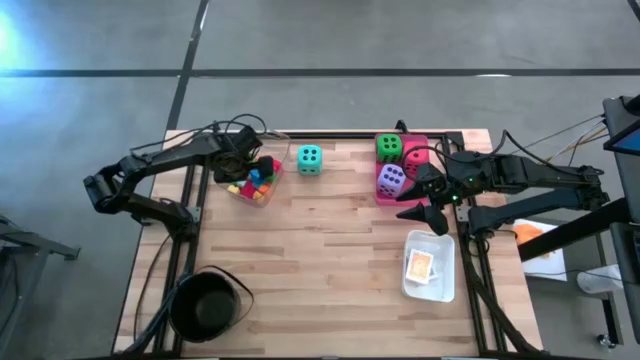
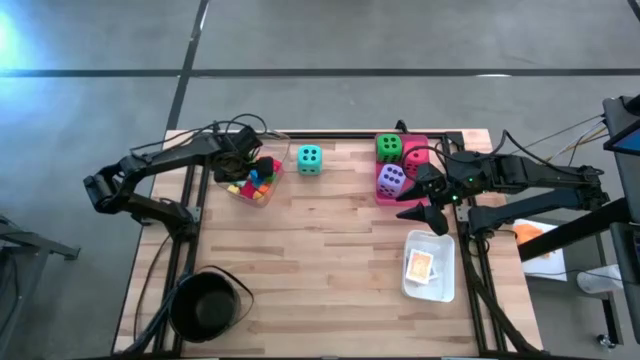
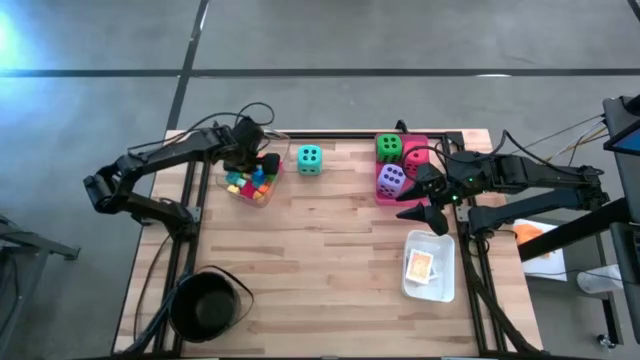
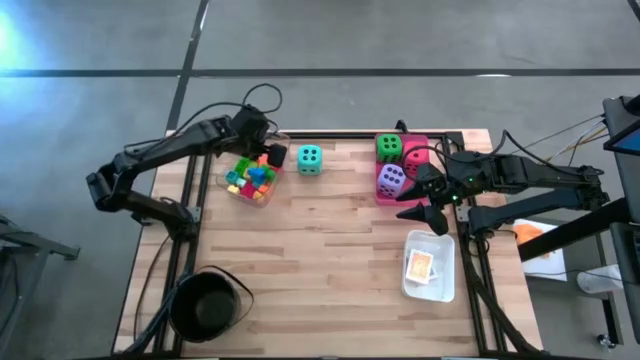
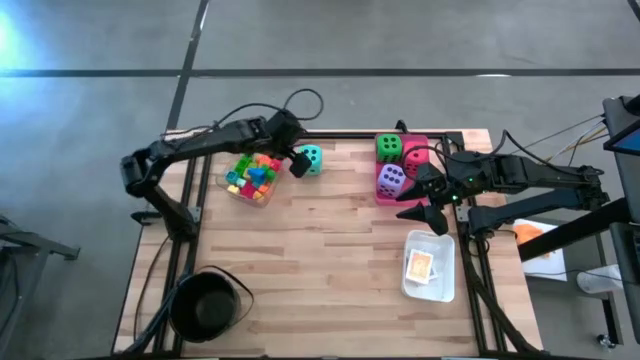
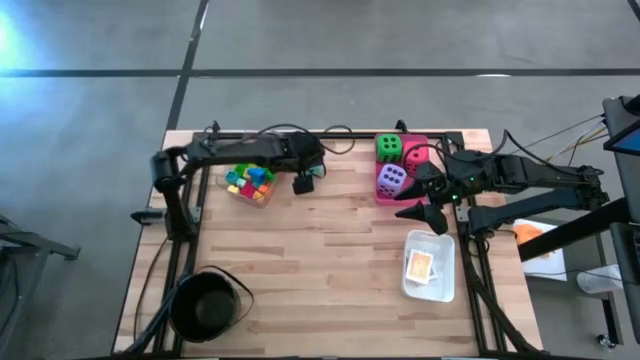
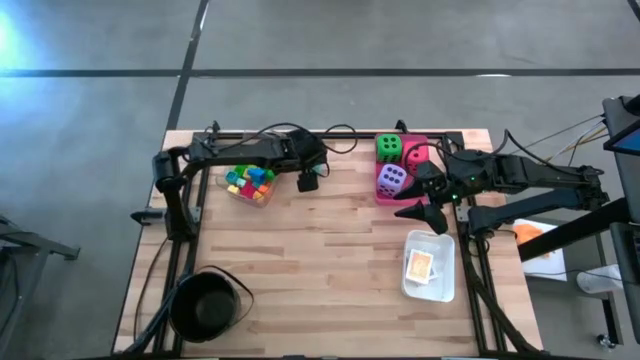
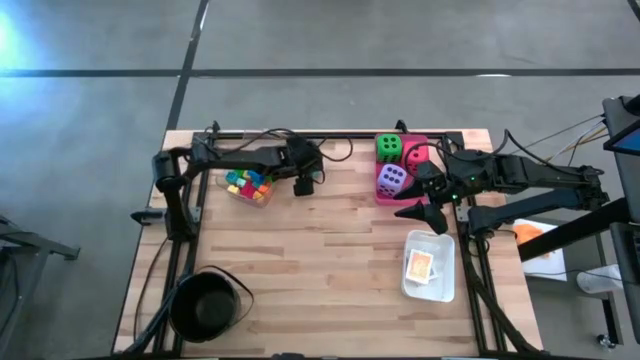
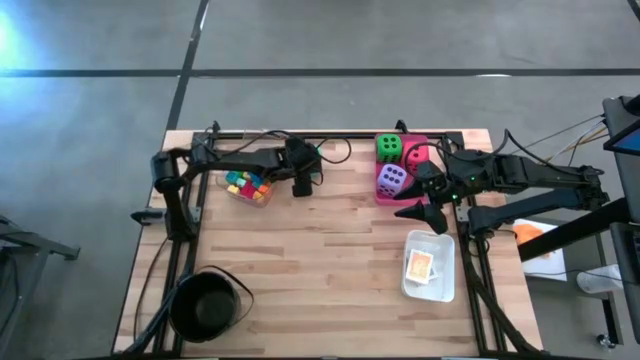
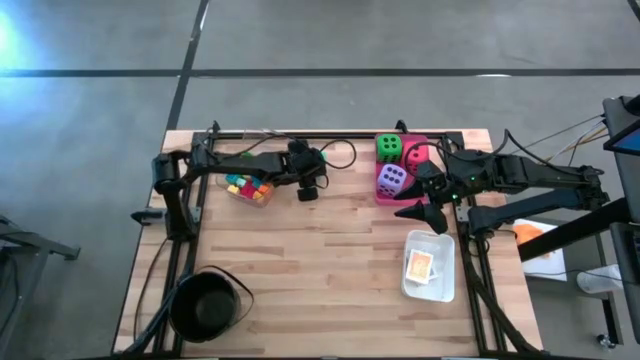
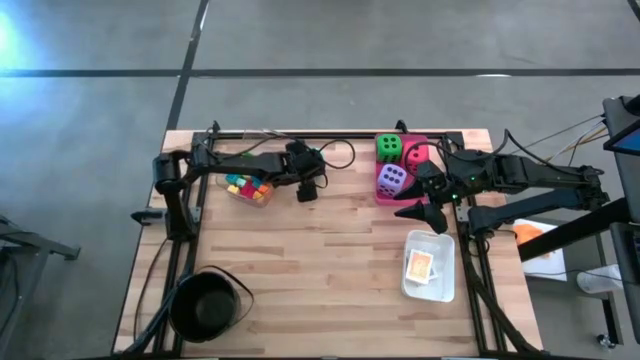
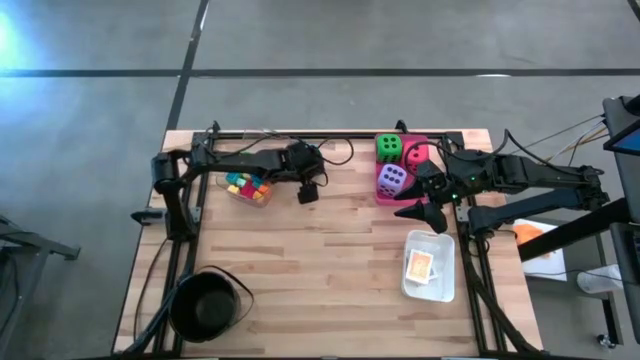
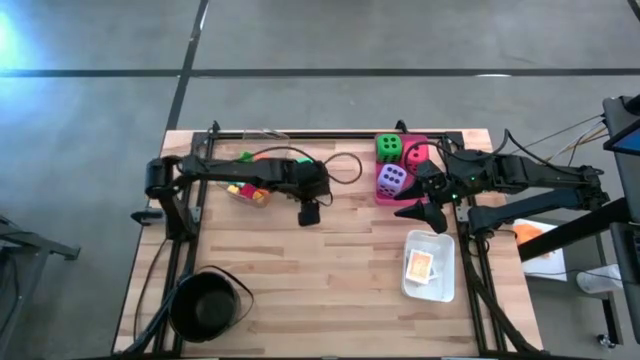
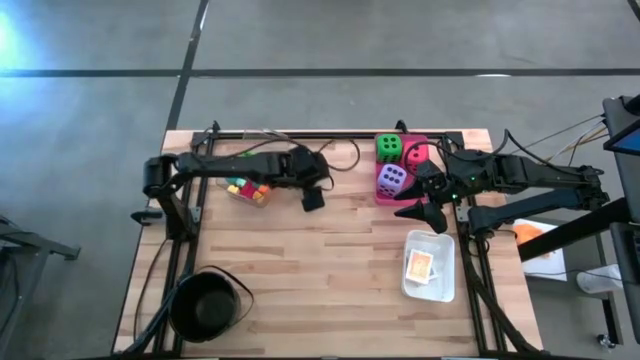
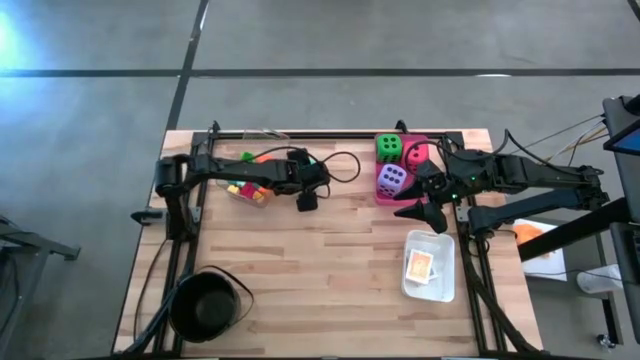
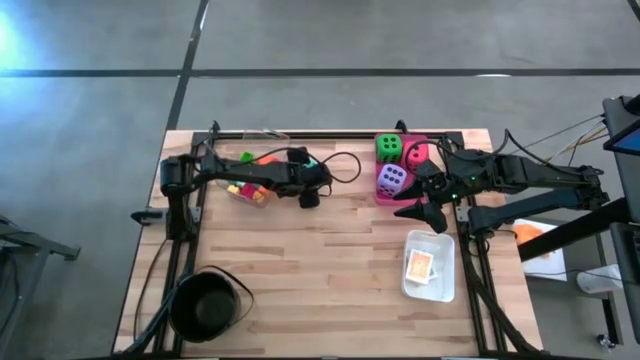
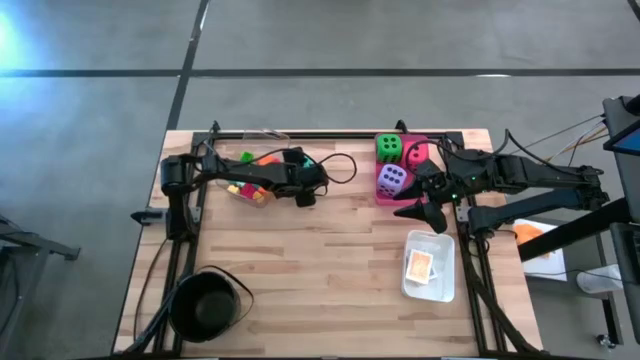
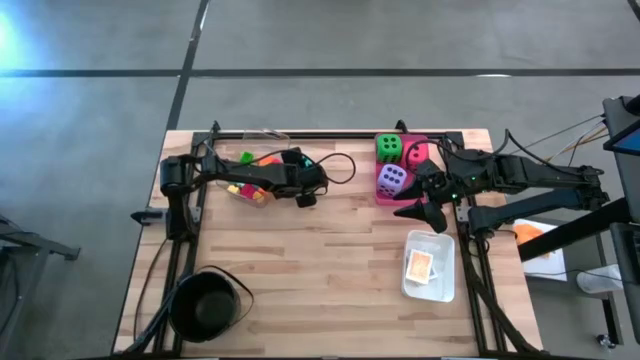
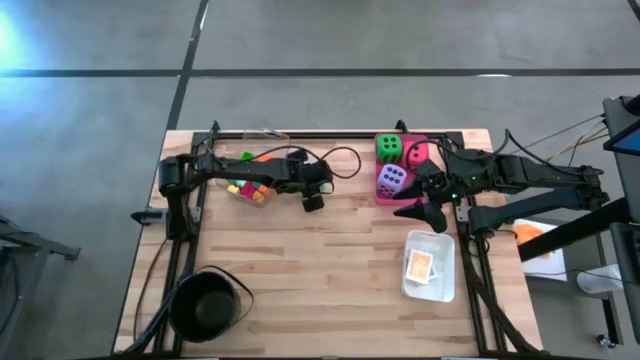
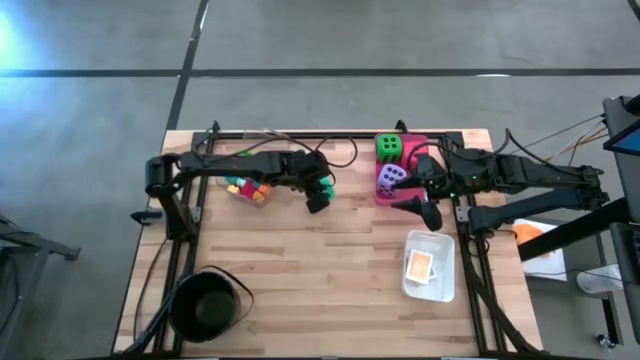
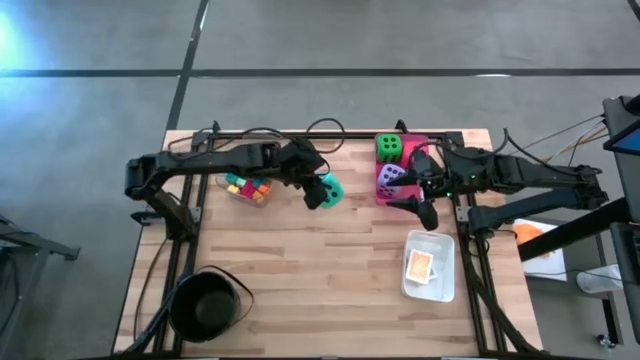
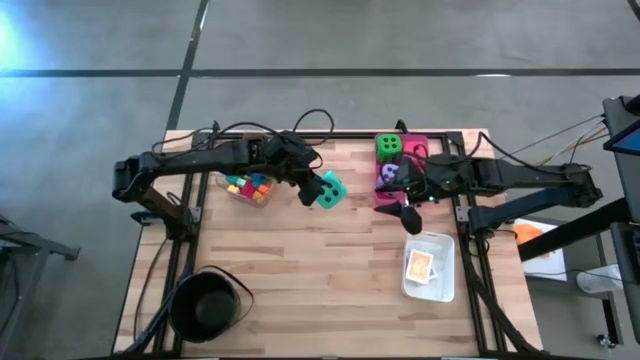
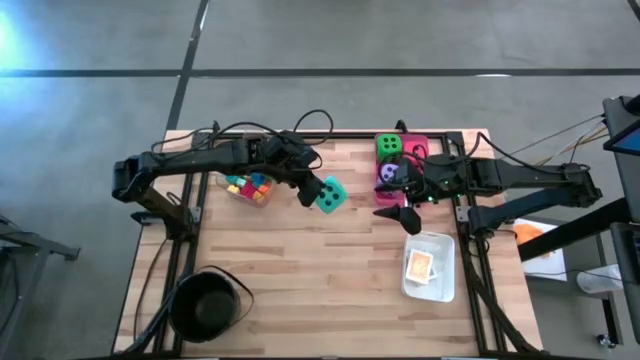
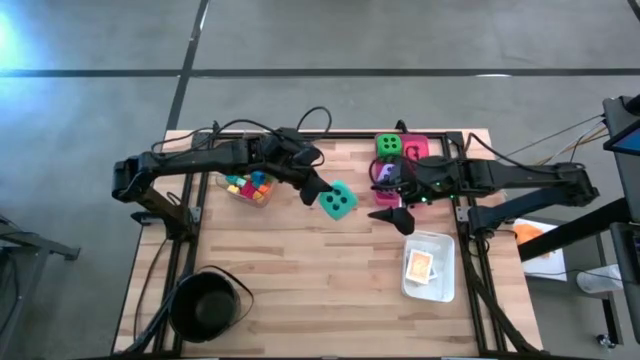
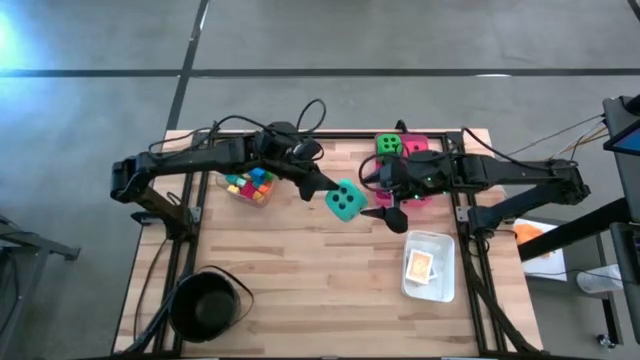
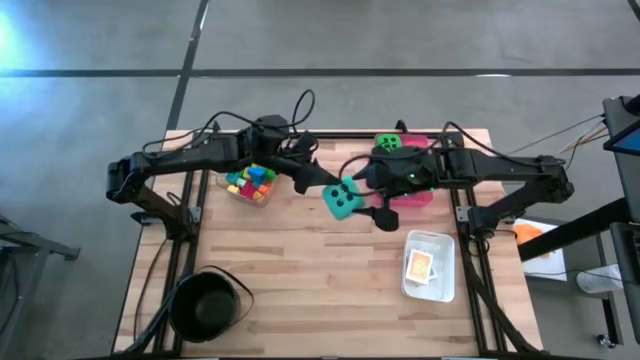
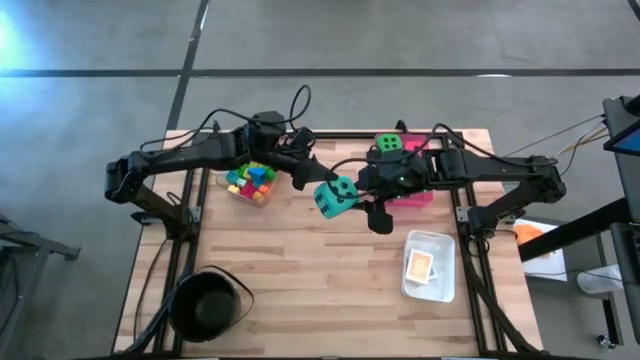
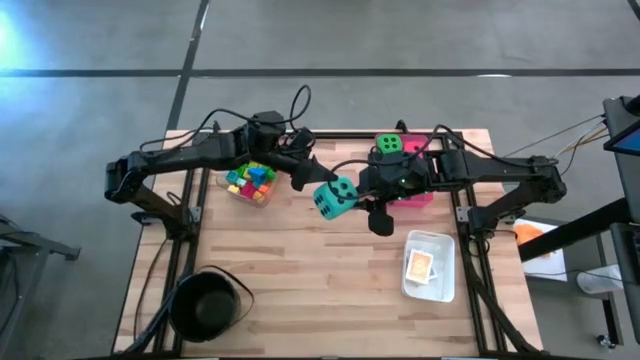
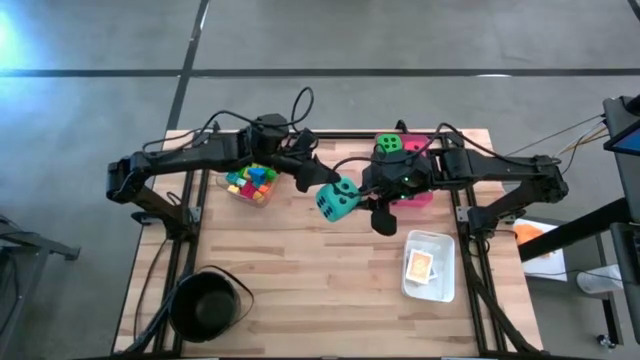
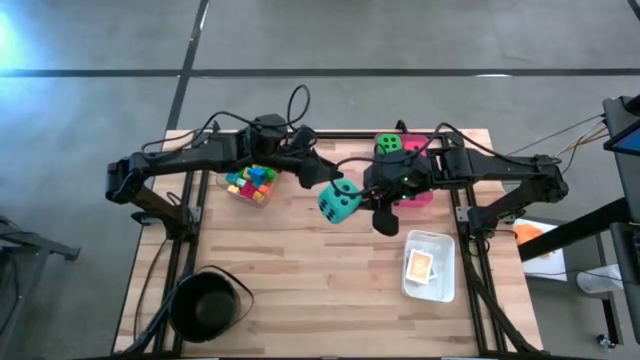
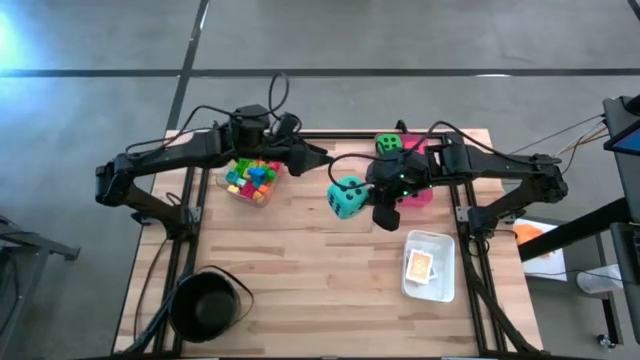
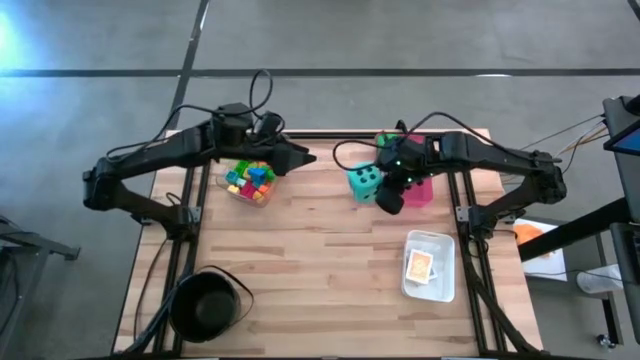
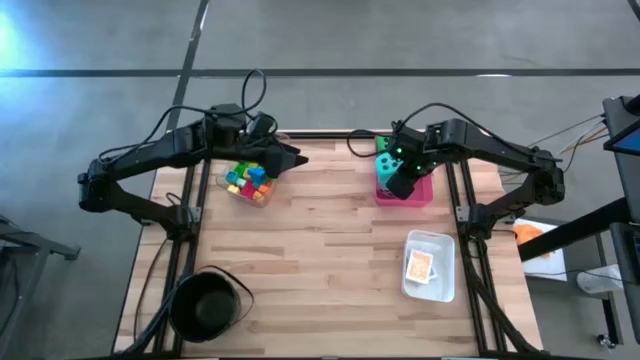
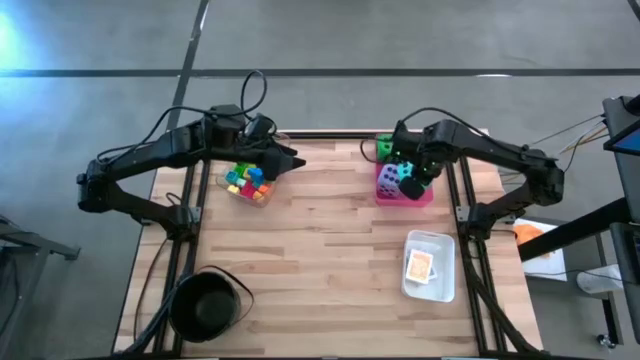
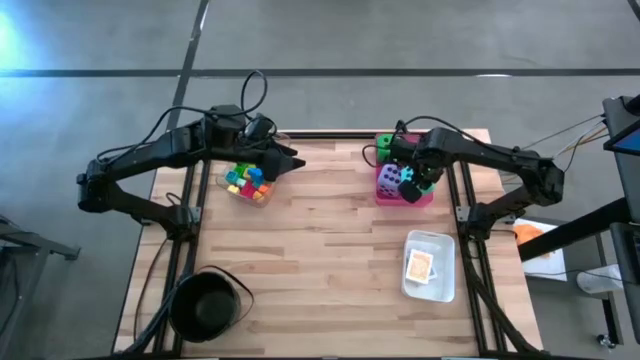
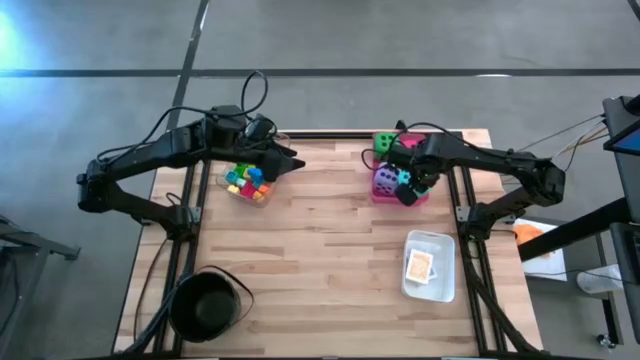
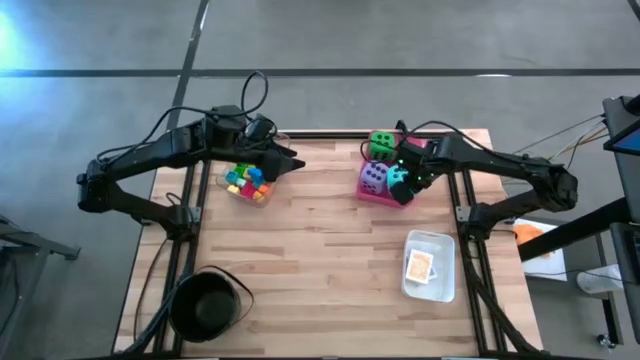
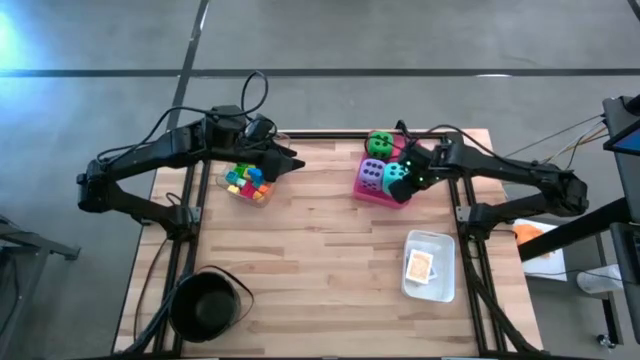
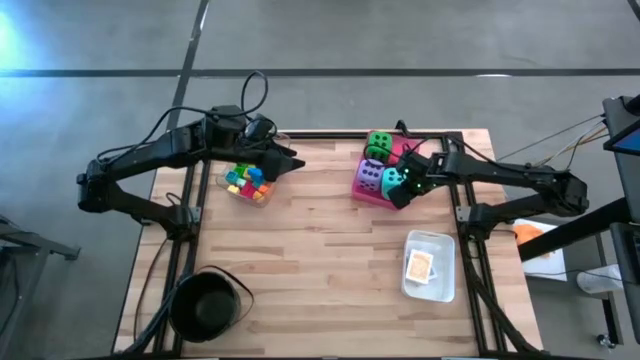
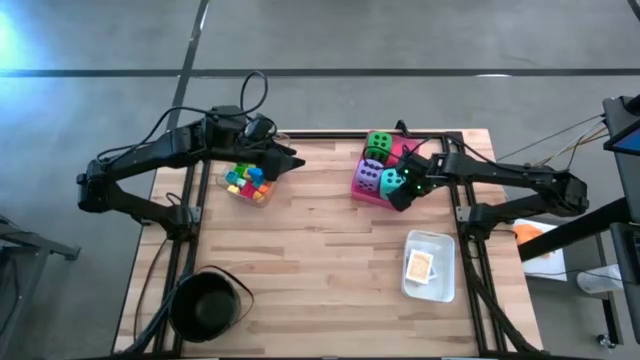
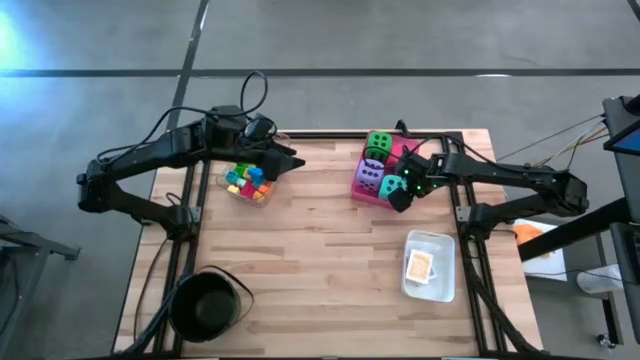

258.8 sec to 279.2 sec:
Task: Pick & Place Toys
Put the blue die into the pink bin
